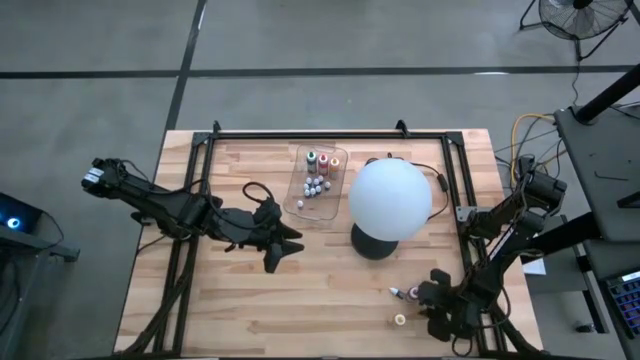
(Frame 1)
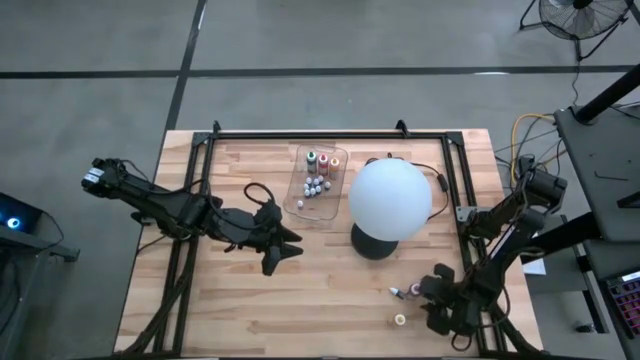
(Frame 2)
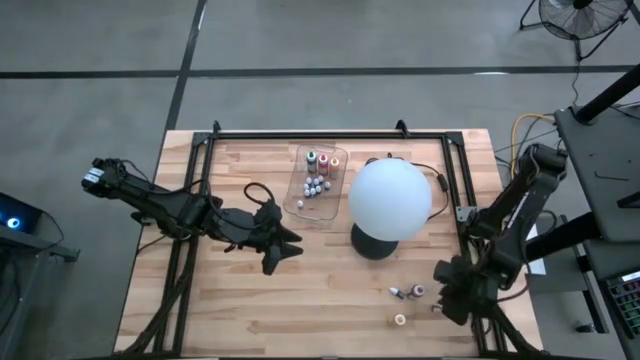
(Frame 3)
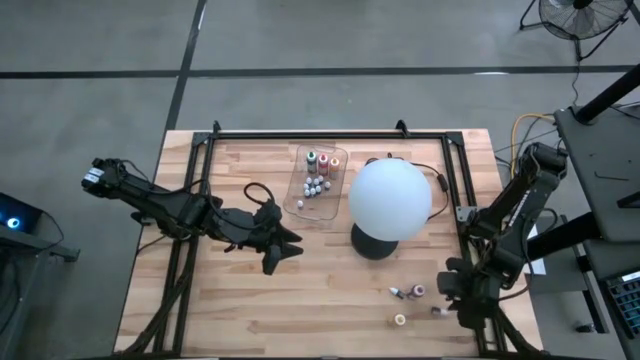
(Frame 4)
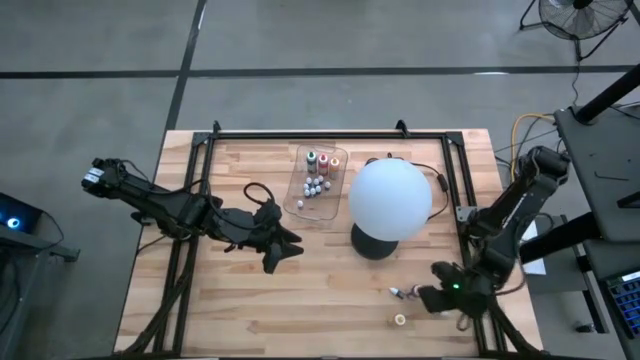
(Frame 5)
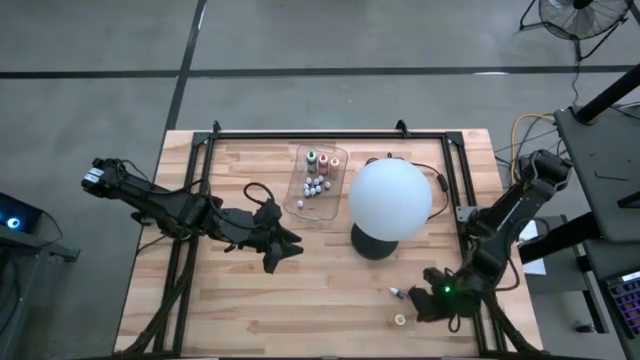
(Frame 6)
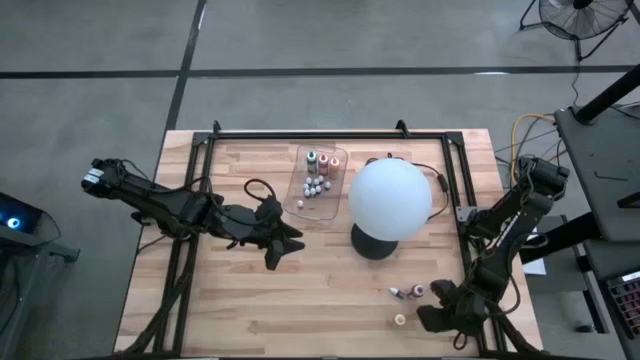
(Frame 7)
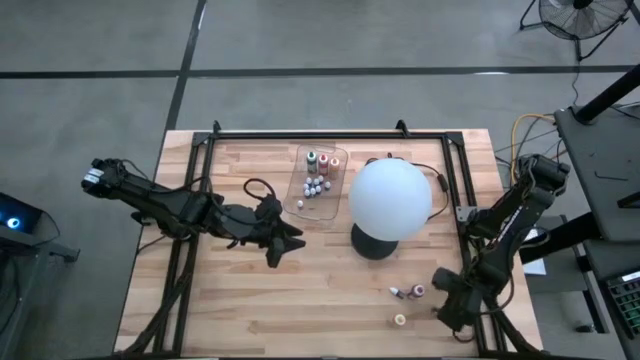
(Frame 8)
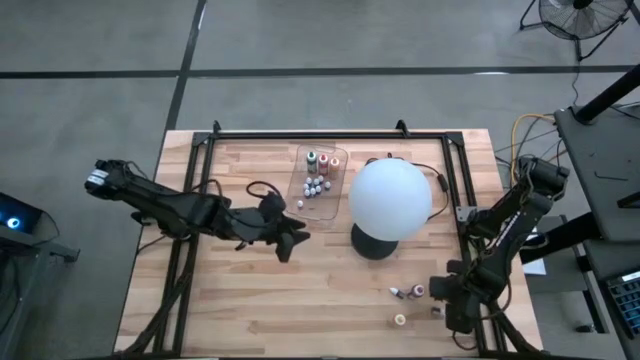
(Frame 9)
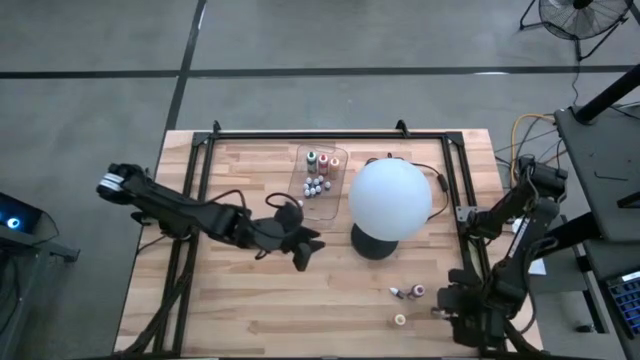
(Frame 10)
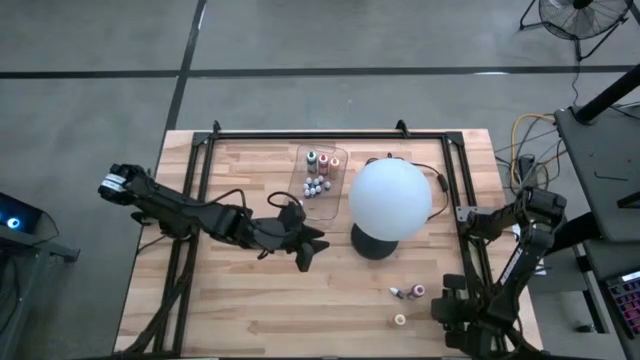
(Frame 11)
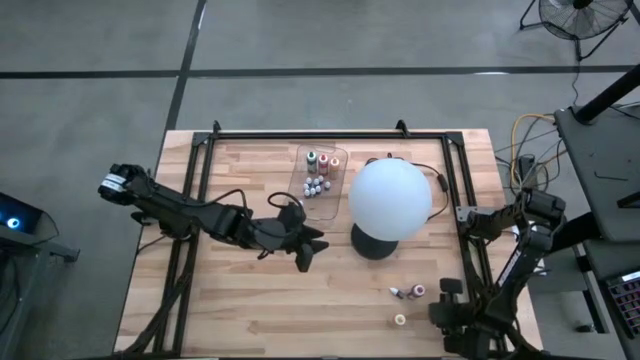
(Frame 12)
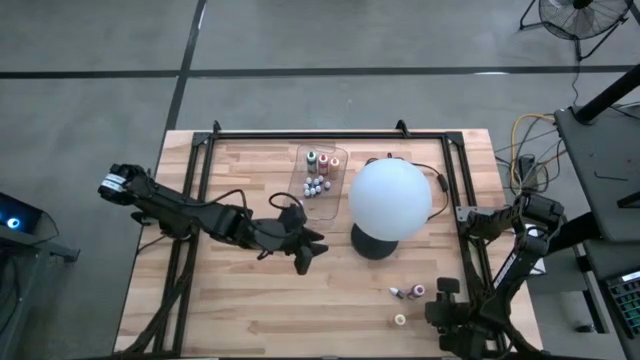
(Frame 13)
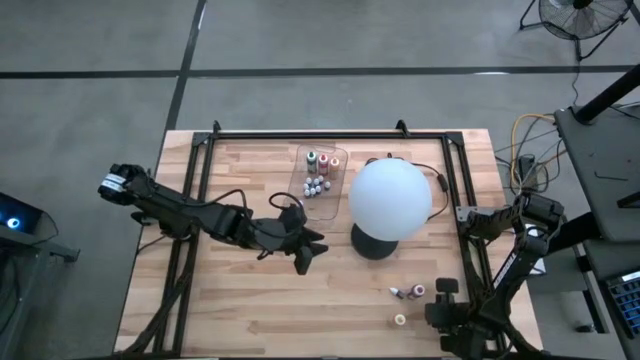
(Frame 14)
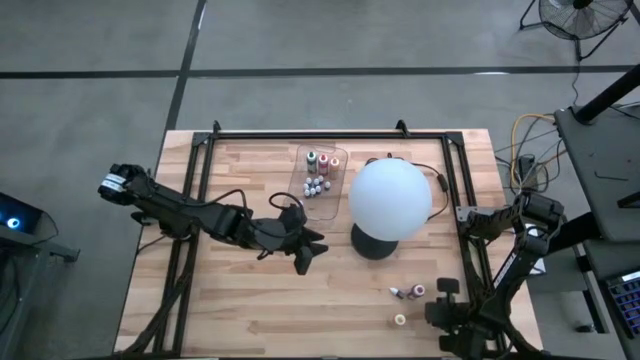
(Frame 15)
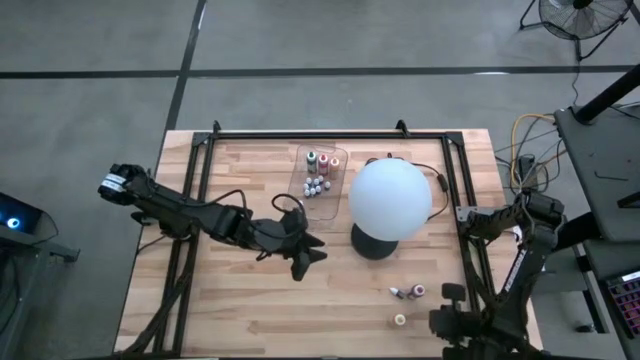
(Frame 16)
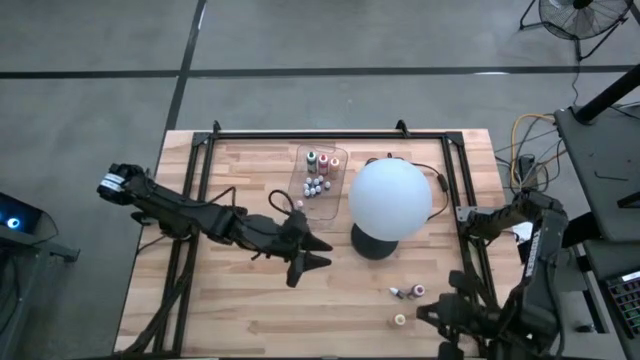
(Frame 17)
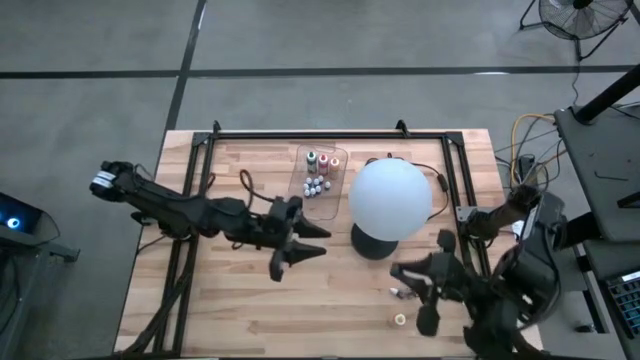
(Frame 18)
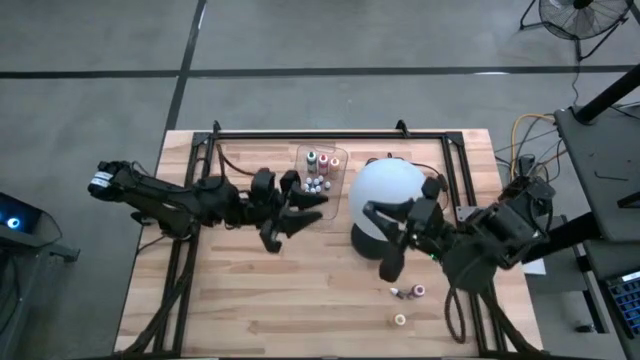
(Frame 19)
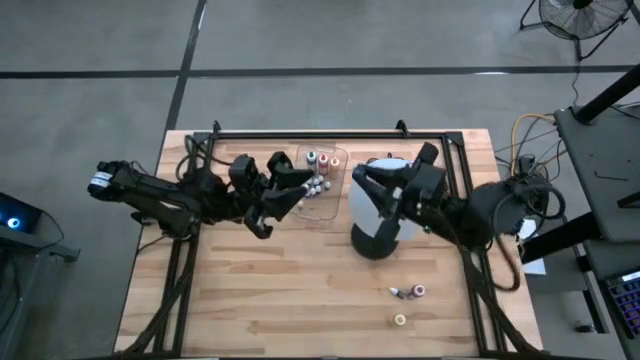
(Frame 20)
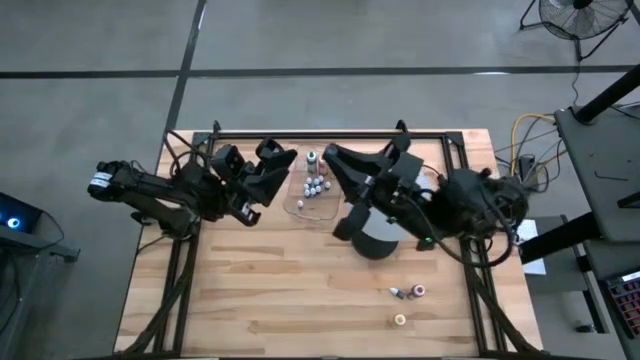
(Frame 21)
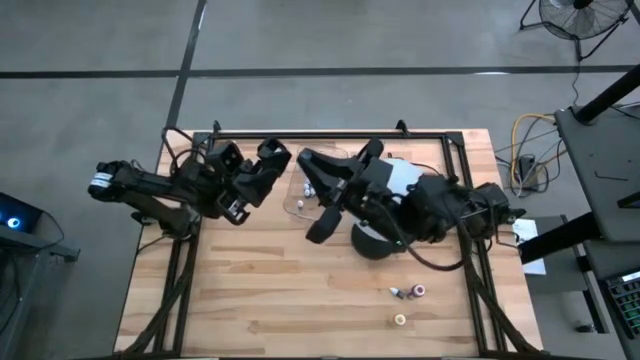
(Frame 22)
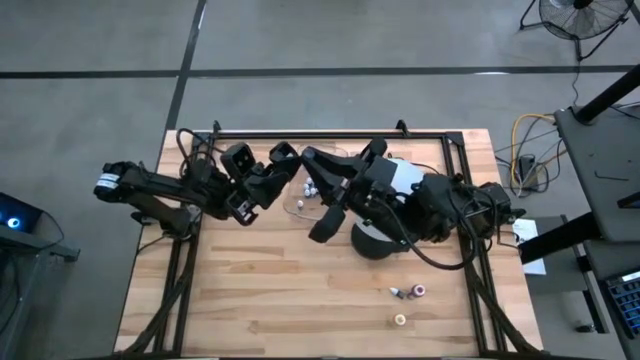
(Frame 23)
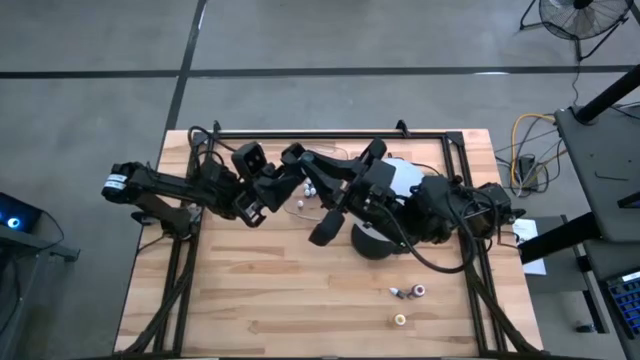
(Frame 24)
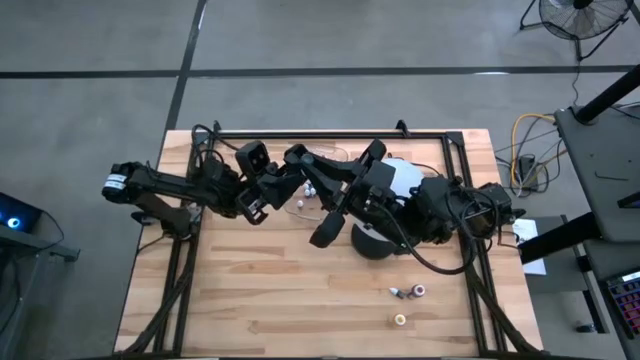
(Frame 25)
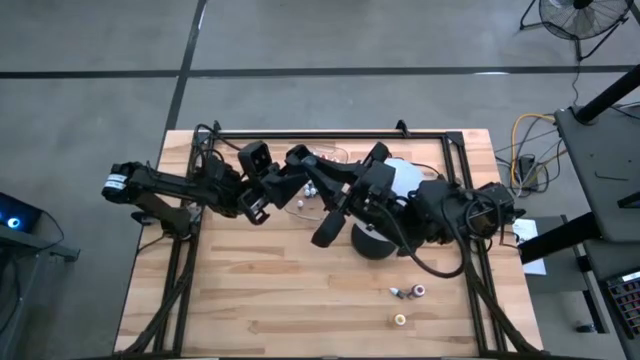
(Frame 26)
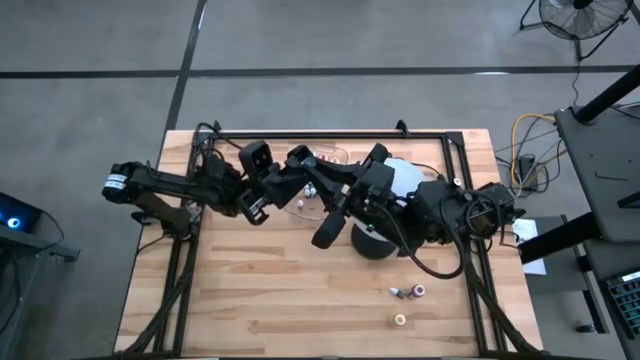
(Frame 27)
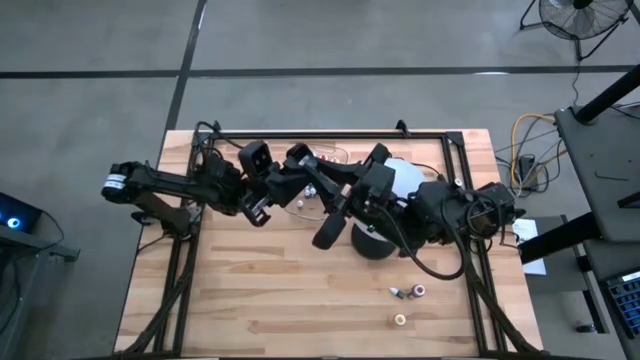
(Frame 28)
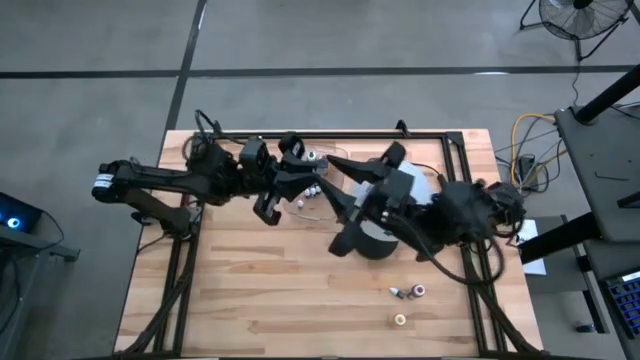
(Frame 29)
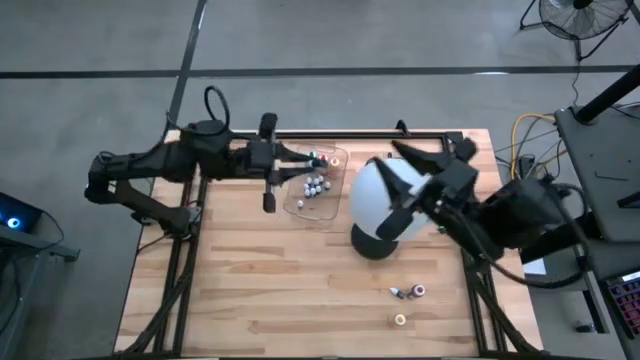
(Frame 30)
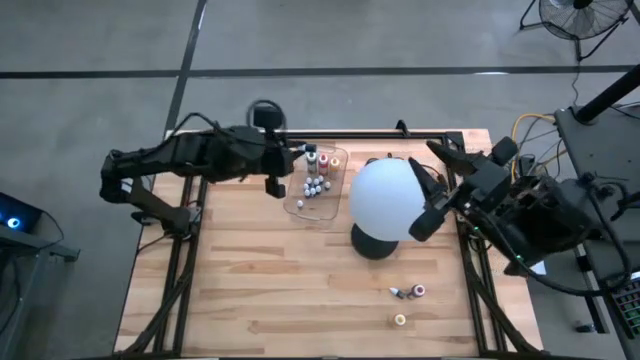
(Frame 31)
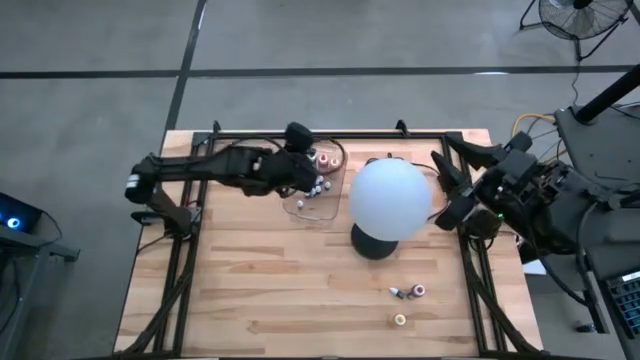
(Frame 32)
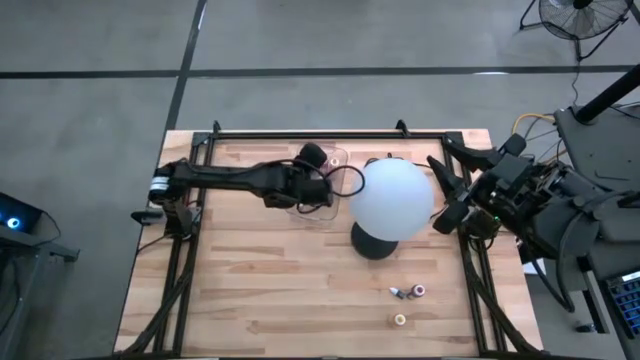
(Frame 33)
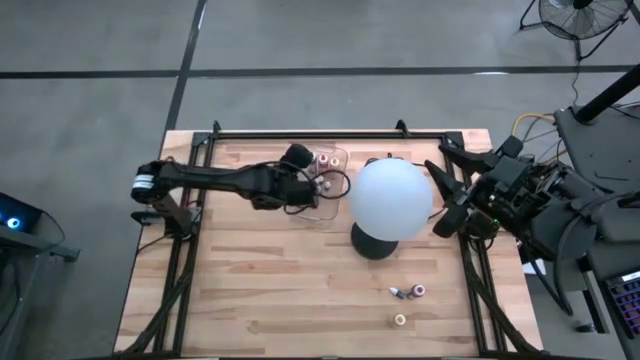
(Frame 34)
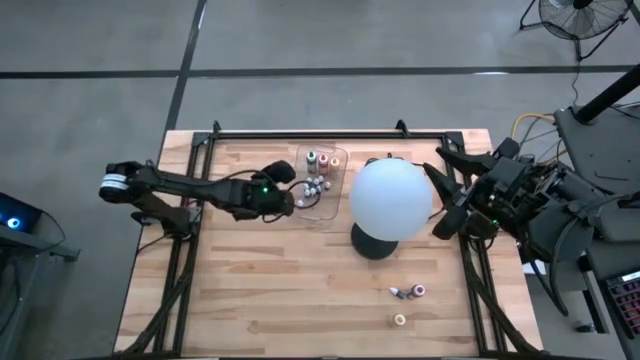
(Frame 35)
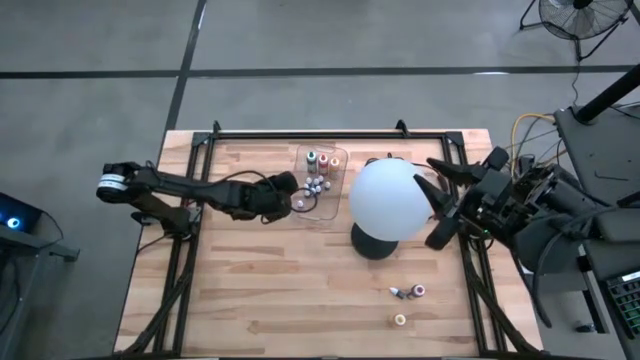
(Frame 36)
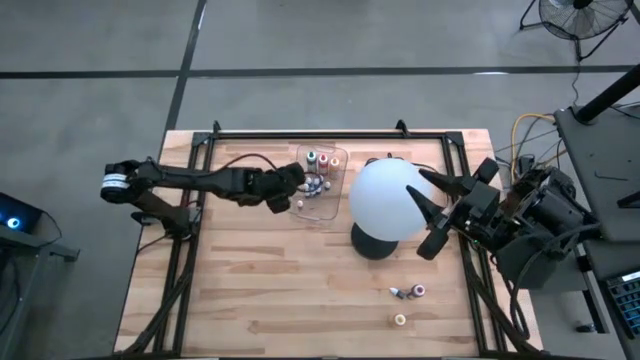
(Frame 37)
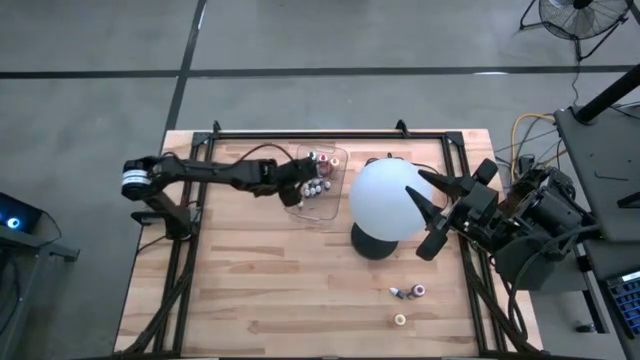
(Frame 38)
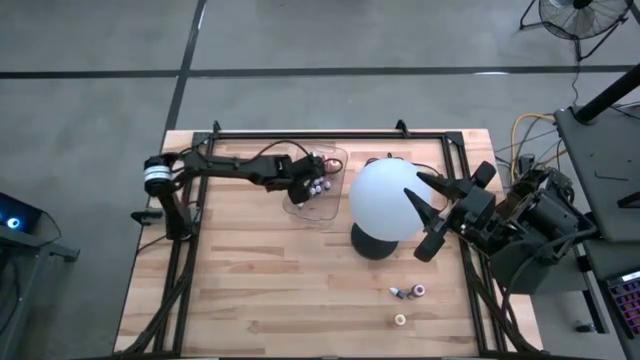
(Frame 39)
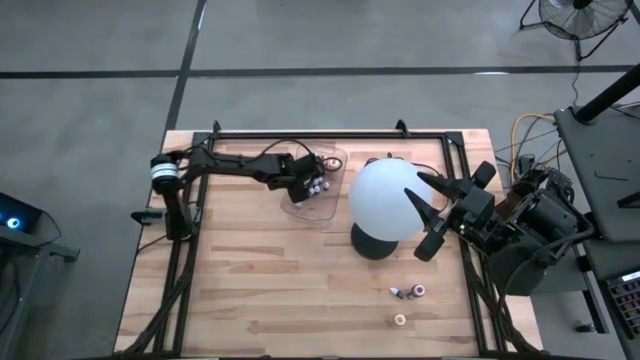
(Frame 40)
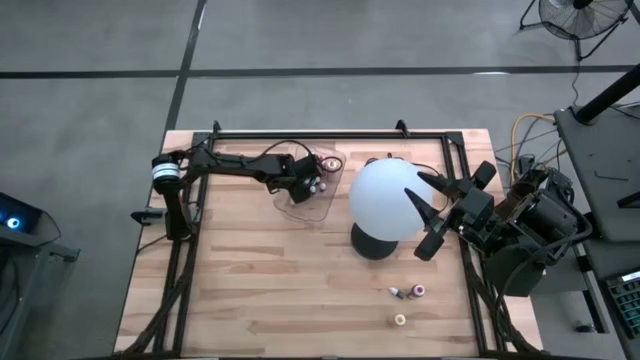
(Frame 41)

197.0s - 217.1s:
Task: Pick & Place food coloring
Put the small black food coloring bottle into the transparent bin
